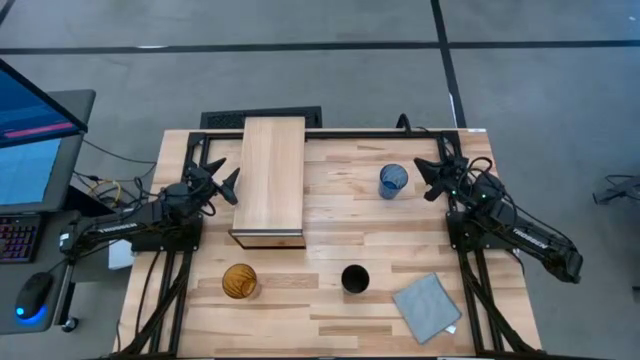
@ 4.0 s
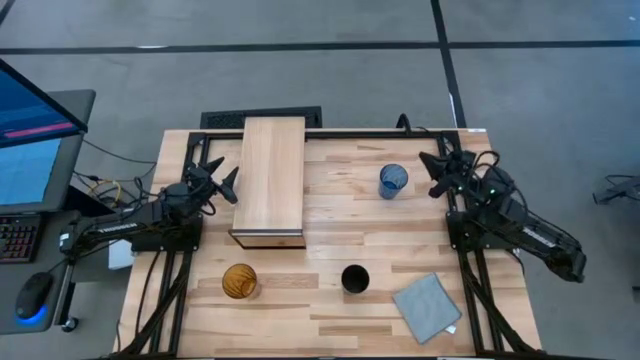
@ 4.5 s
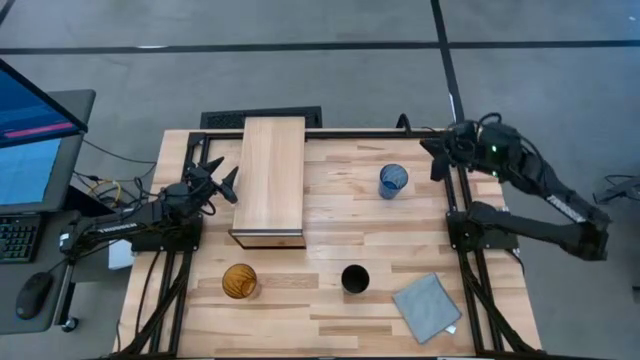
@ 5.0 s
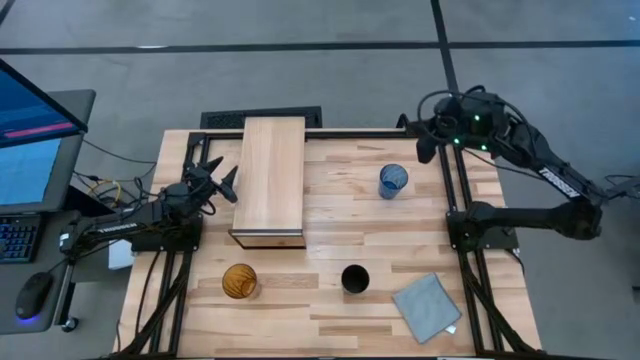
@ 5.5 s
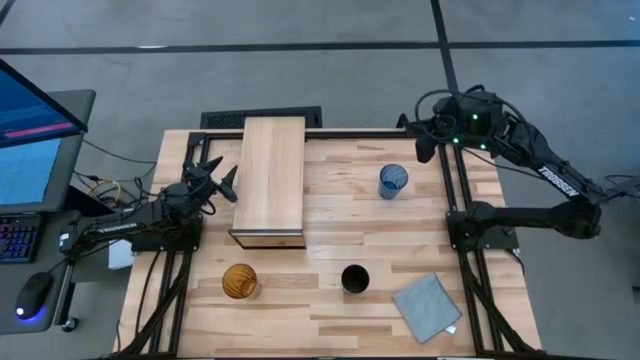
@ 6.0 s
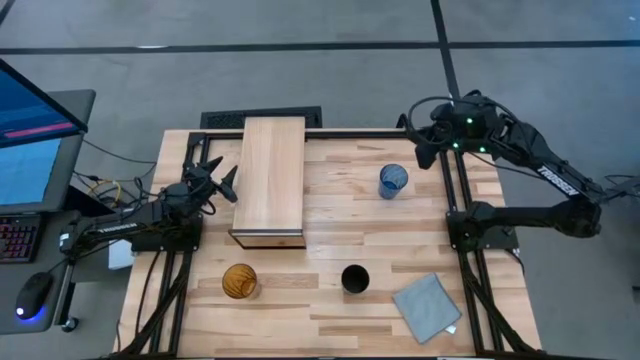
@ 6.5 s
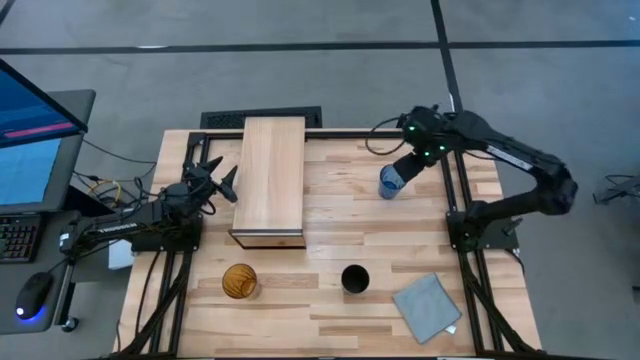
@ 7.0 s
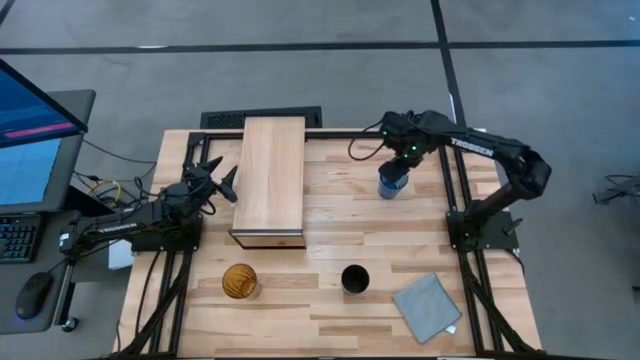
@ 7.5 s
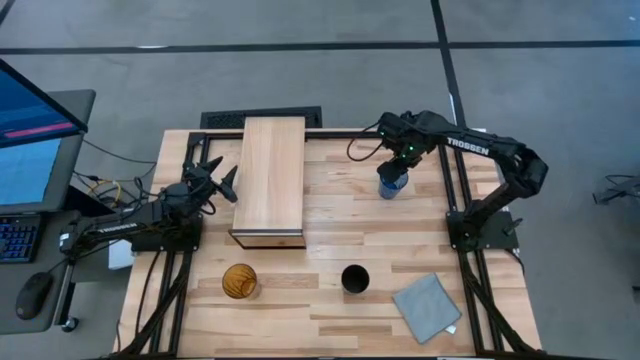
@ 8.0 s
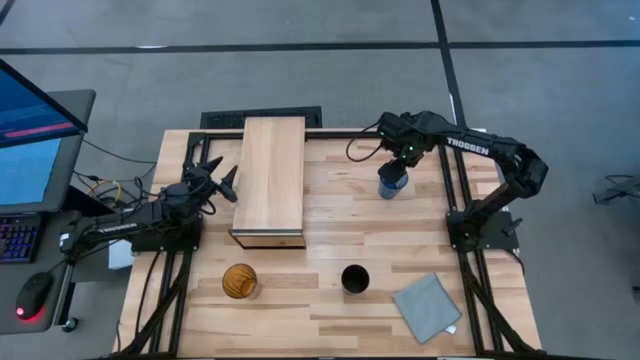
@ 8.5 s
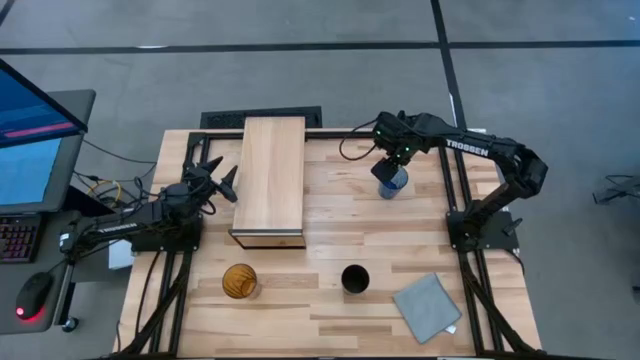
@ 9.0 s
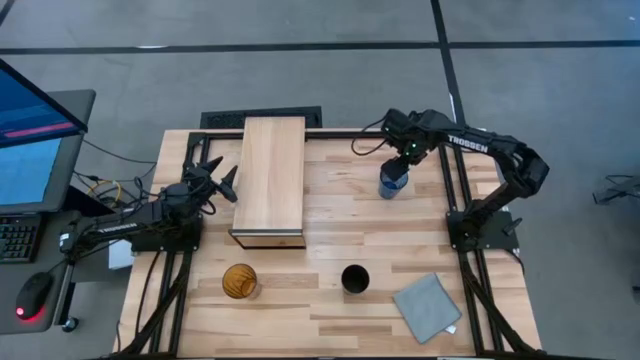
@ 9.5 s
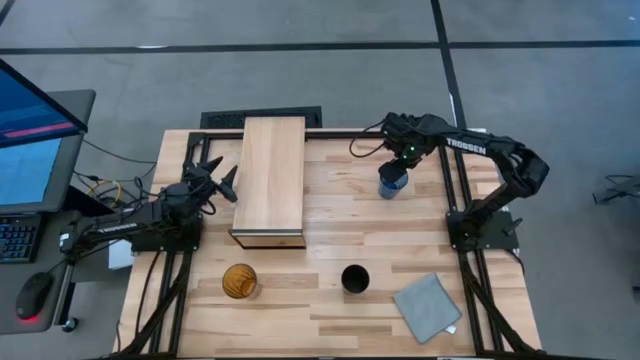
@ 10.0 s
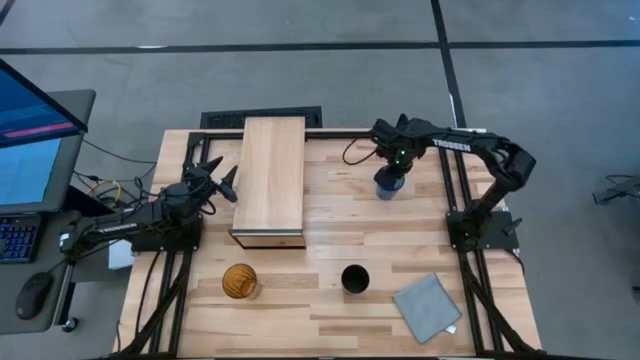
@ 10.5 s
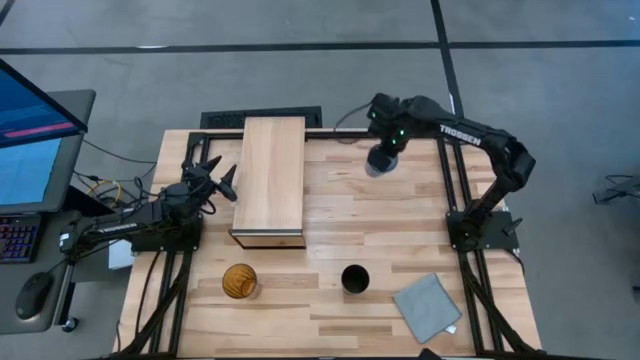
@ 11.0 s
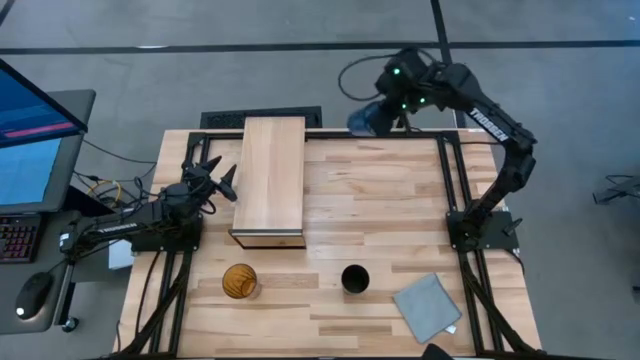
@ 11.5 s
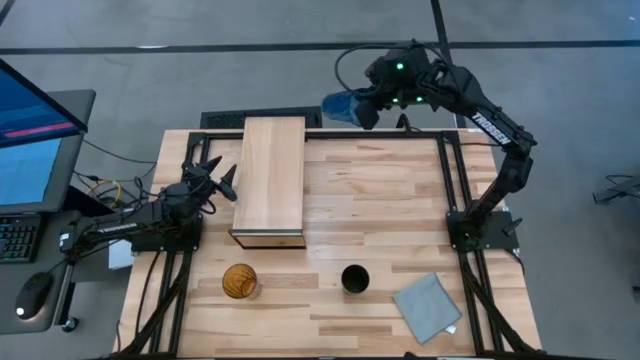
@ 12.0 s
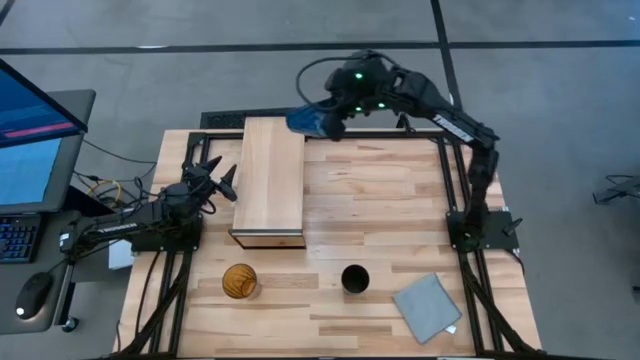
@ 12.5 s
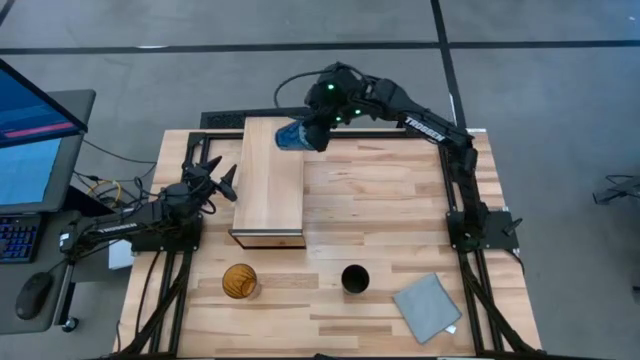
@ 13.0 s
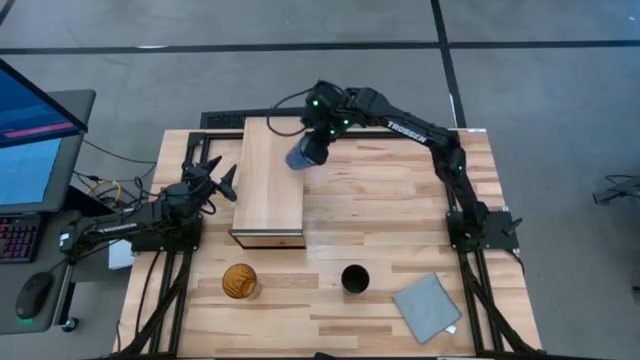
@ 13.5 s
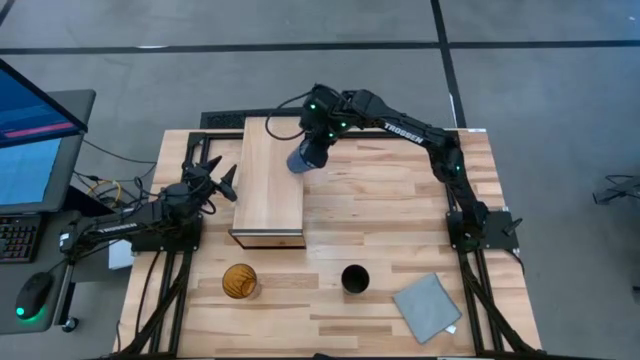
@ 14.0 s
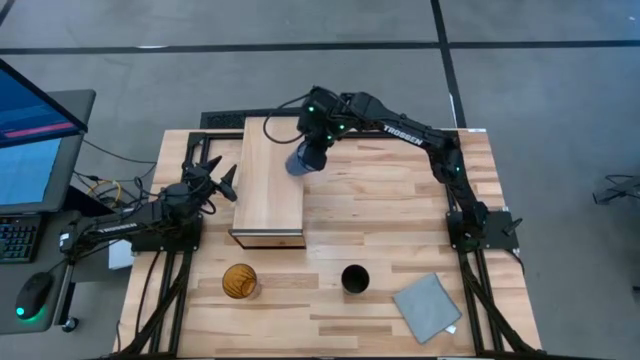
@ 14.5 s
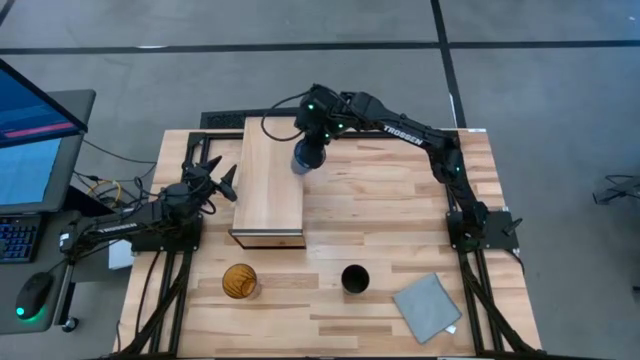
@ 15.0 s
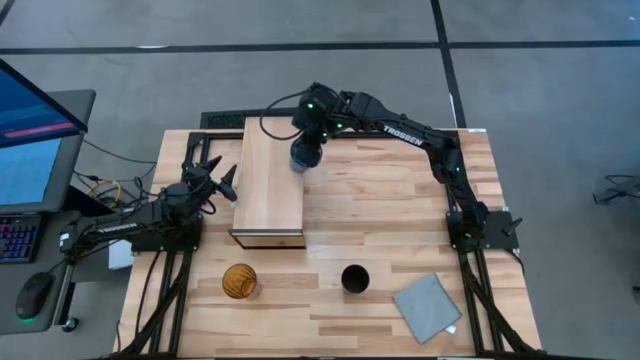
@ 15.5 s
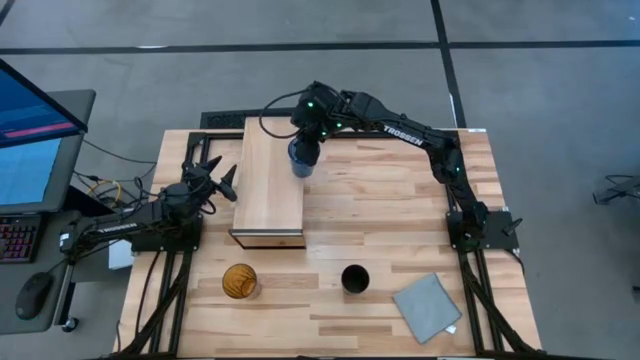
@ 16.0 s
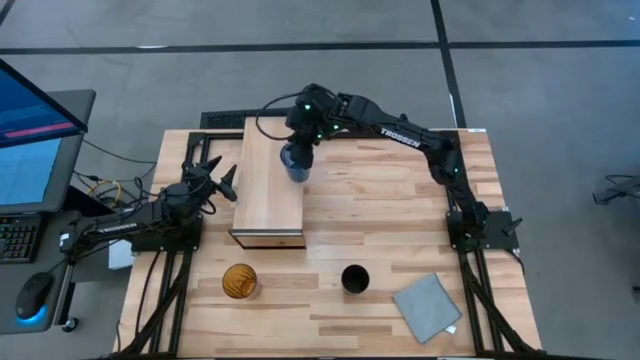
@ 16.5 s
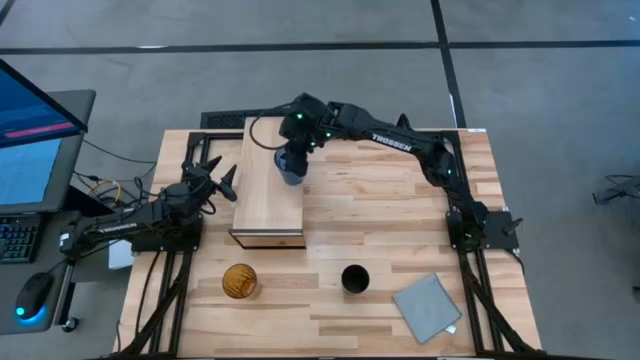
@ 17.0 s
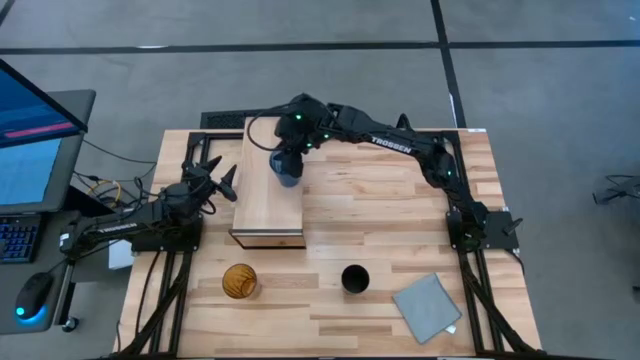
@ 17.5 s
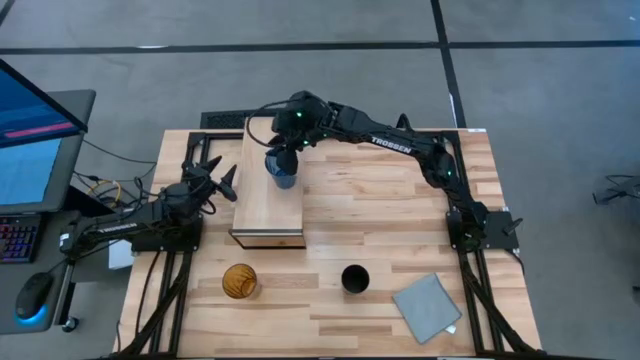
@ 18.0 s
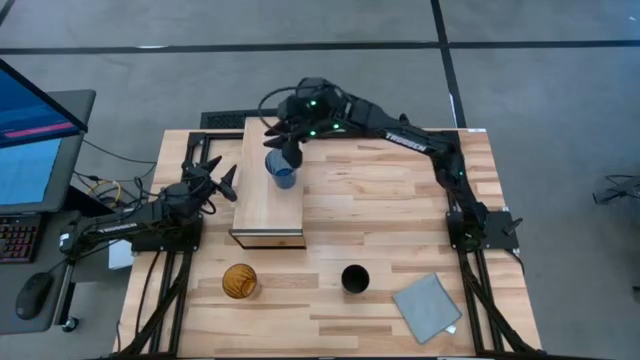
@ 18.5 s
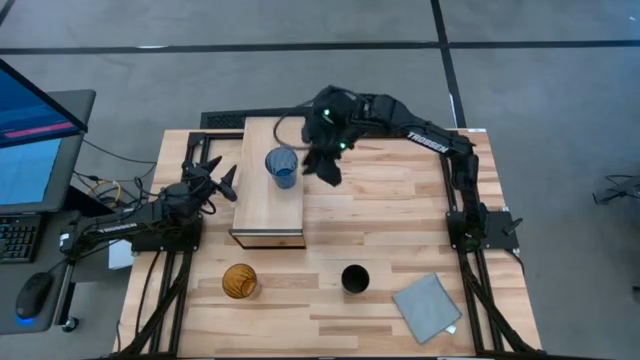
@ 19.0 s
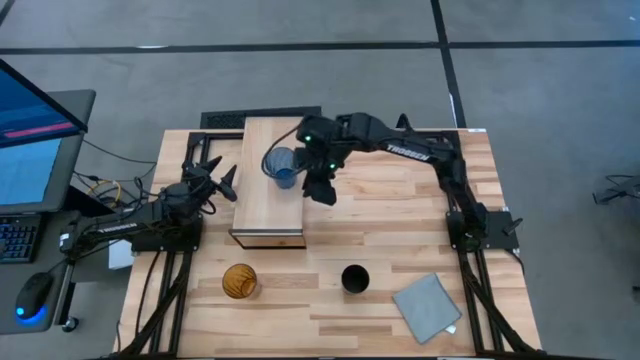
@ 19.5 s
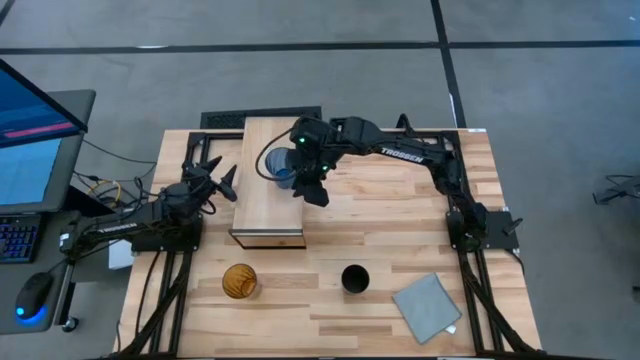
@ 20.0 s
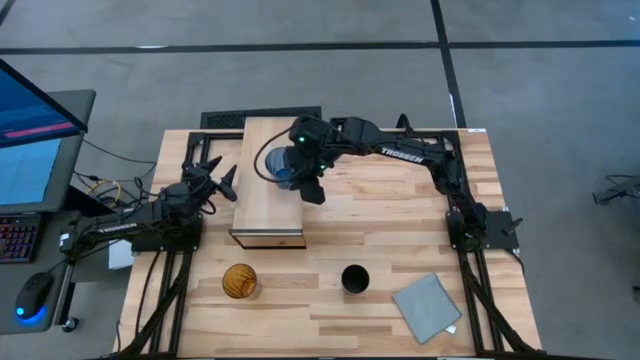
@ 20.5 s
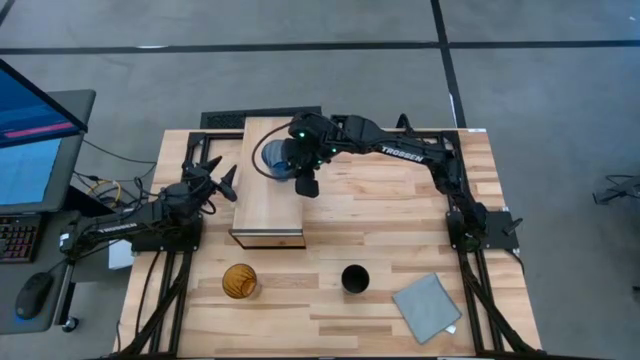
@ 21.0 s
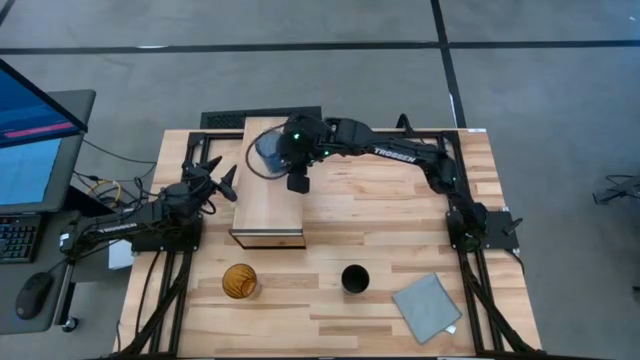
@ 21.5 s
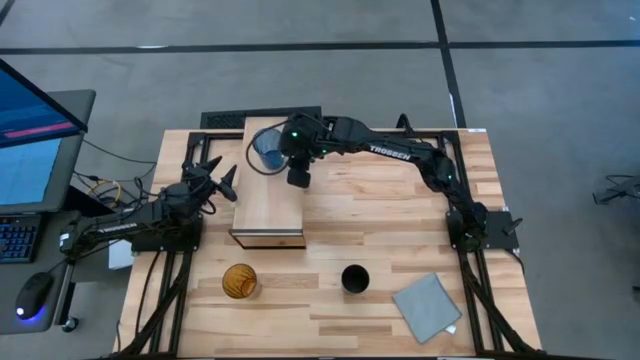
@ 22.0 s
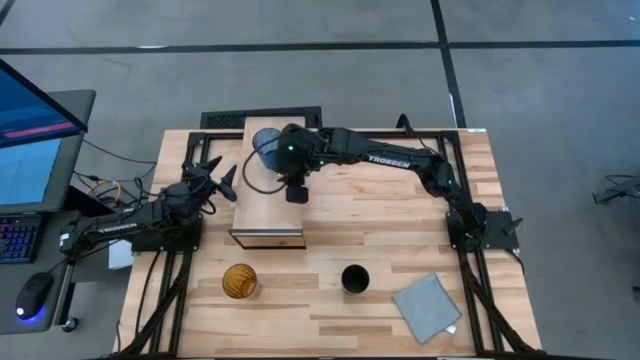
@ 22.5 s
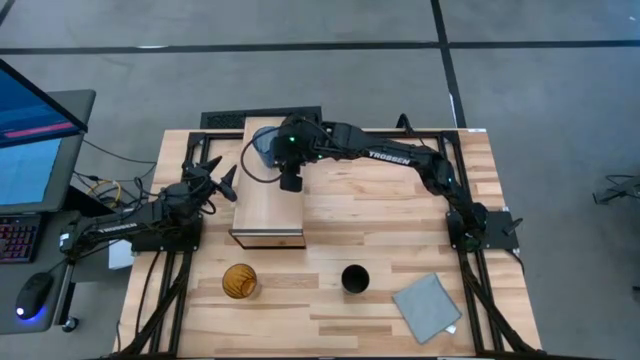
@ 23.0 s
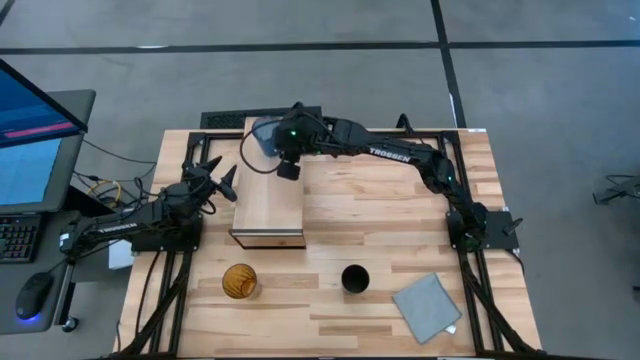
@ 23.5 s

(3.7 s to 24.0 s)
Task: Stack small to large cups/mugs on shelf
Put the blue cup on the shelf
